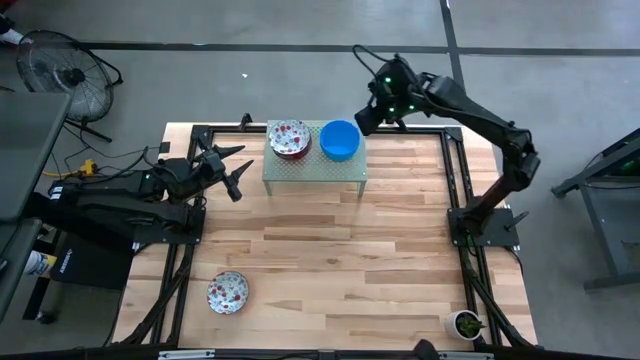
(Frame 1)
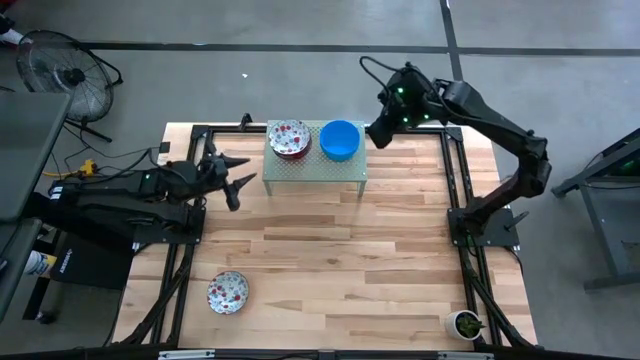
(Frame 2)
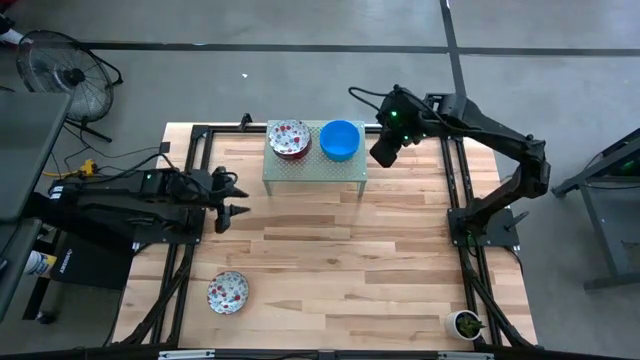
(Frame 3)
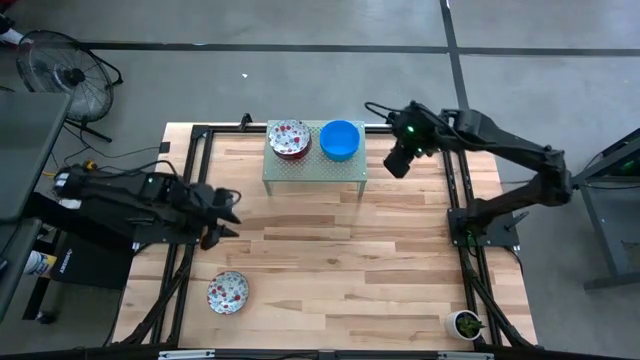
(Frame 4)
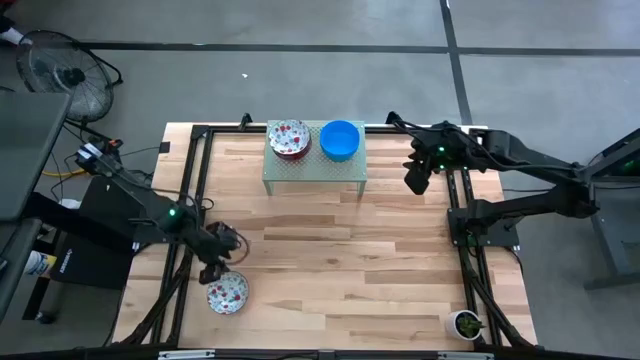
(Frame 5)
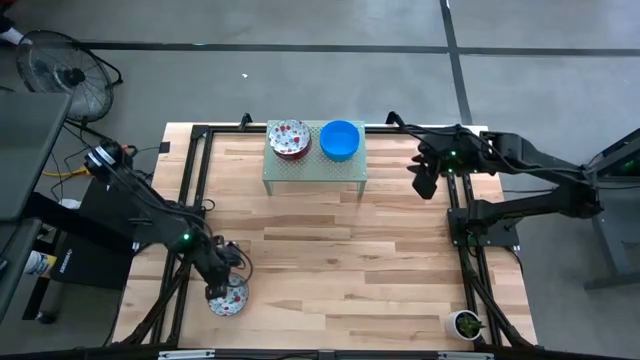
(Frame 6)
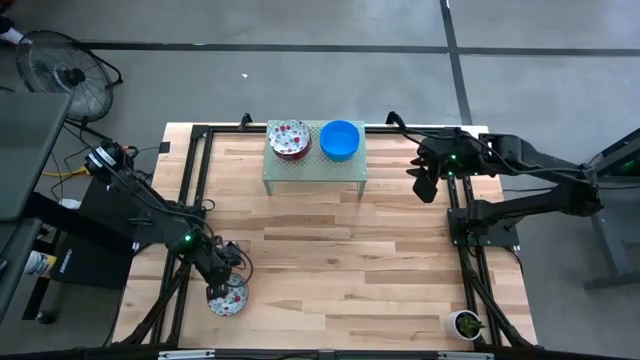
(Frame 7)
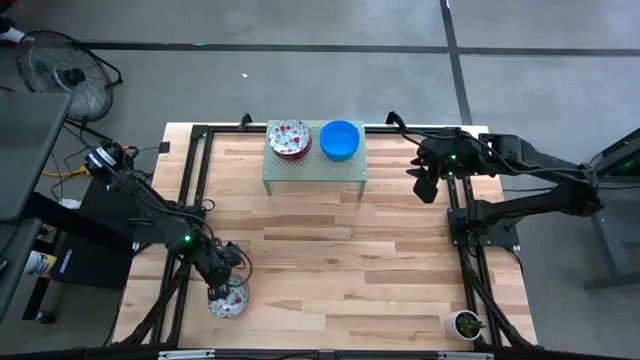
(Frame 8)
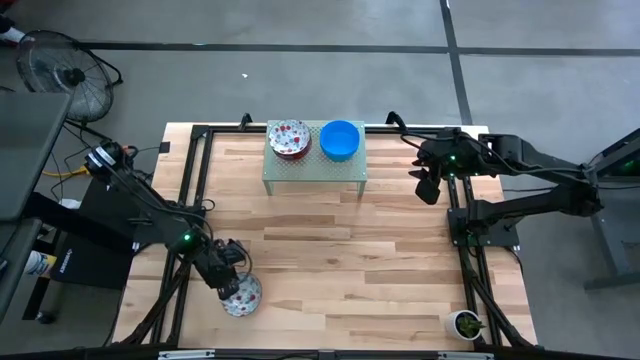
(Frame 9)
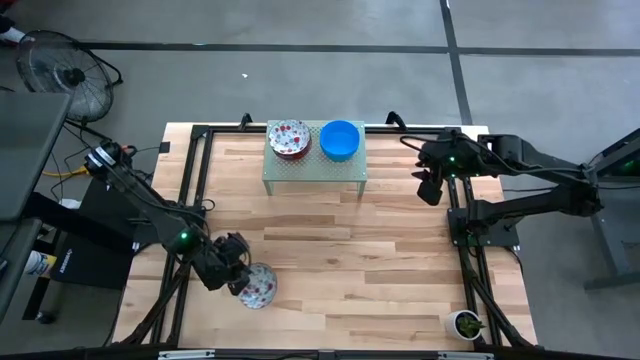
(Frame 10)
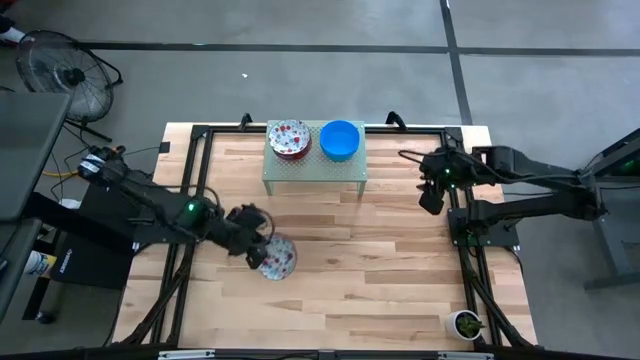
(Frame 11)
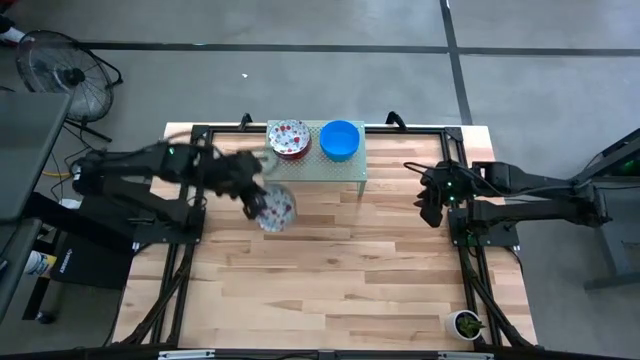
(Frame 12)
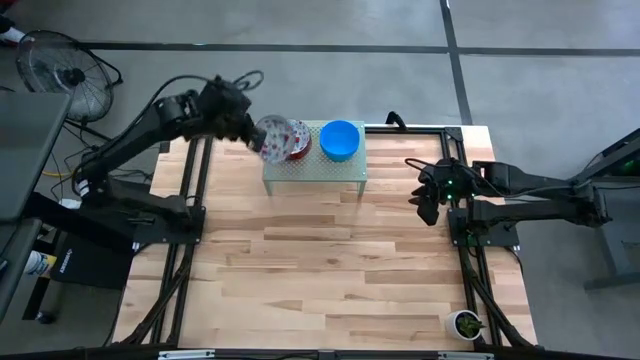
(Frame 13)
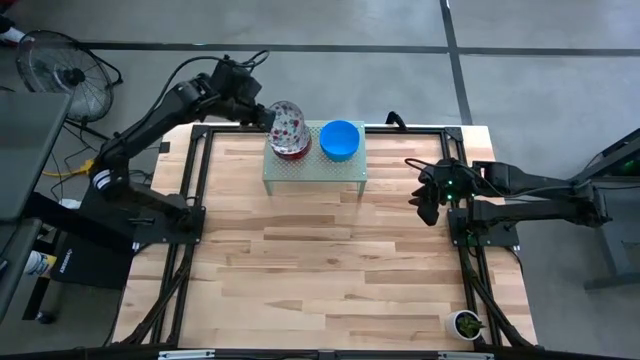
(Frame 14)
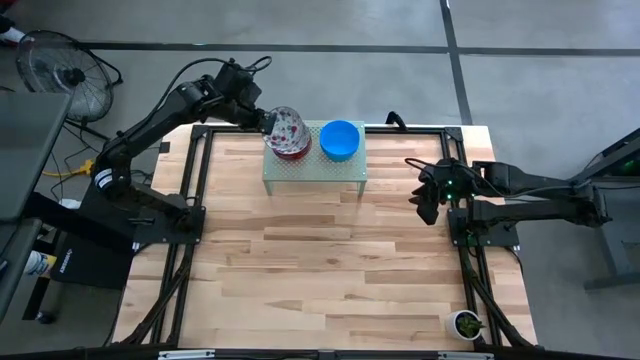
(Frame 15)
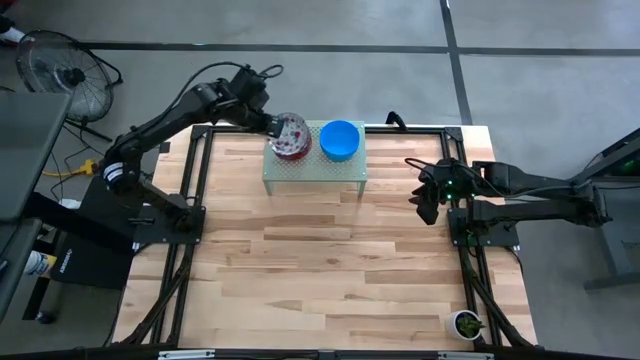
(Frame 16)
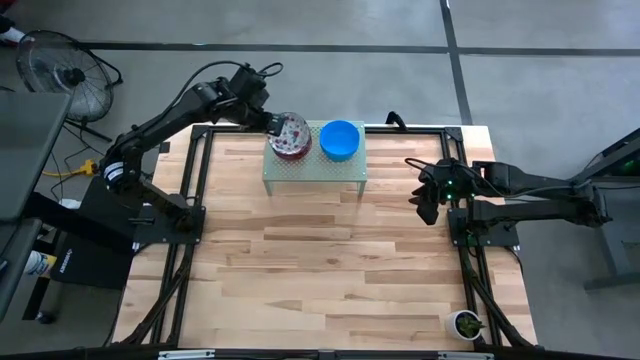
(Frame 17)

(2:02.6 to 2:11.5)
Task: Pick & Place Mini bowls
Stack the white and red bowl on top of the stacked white and red bowls on the shelf

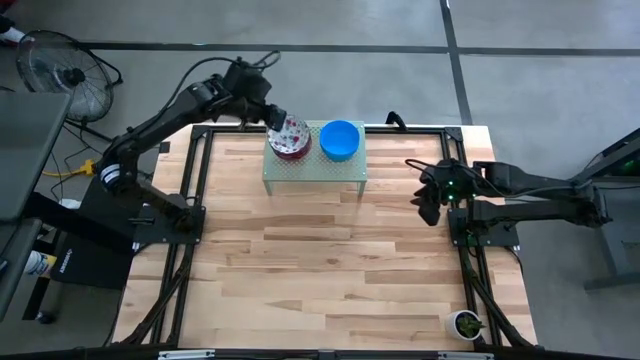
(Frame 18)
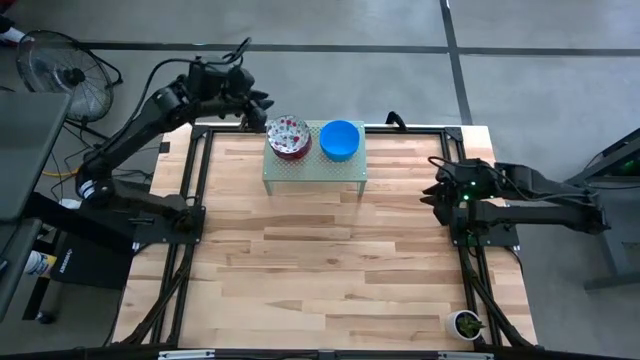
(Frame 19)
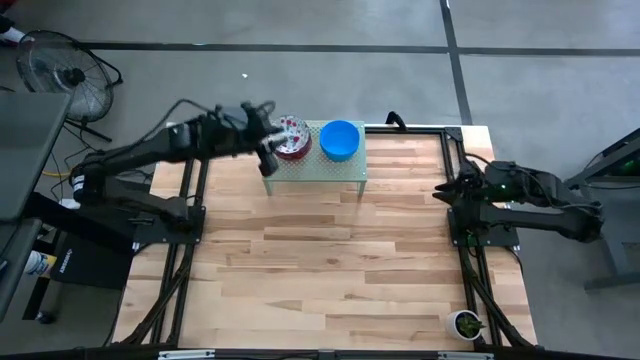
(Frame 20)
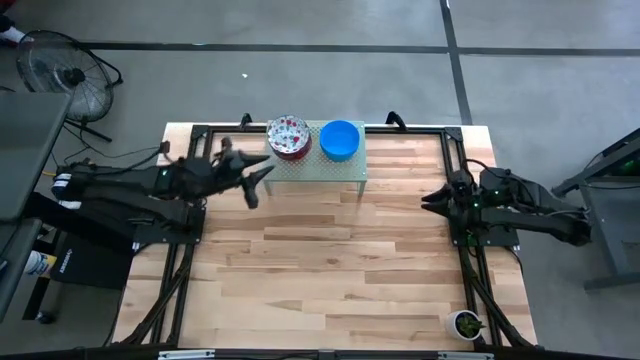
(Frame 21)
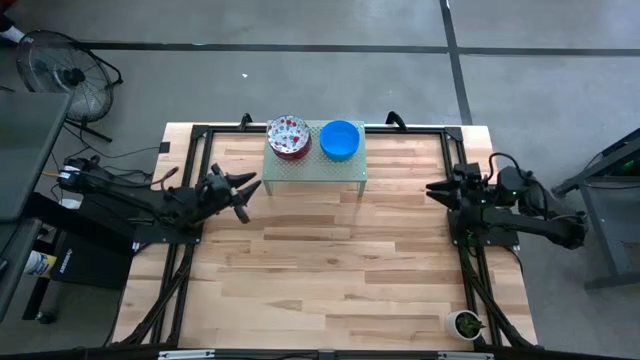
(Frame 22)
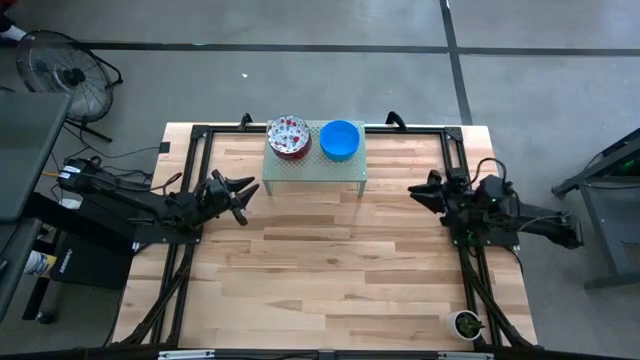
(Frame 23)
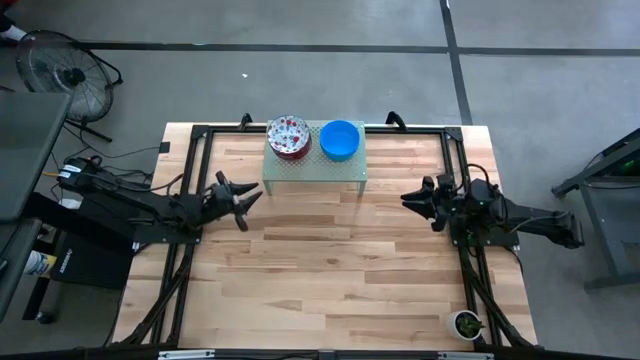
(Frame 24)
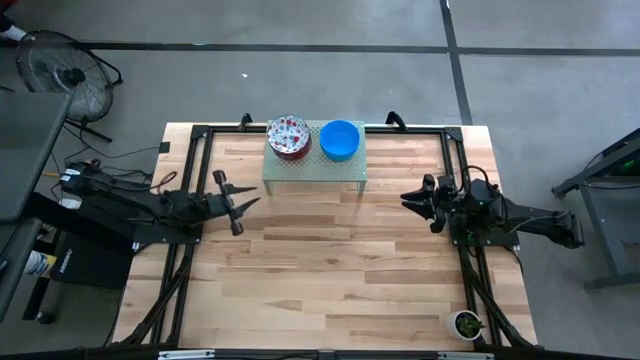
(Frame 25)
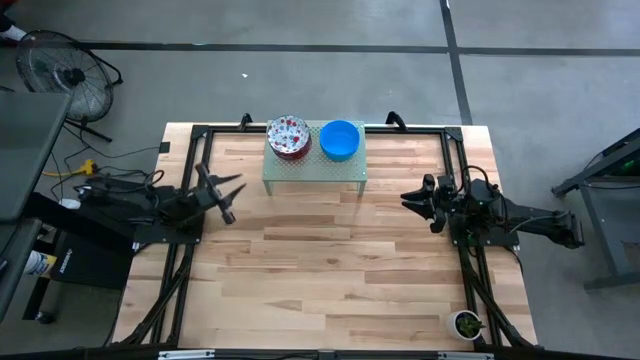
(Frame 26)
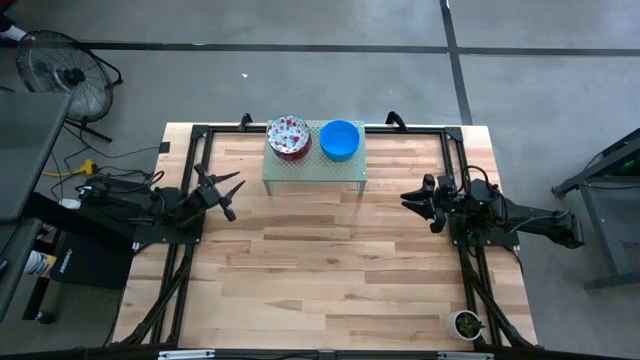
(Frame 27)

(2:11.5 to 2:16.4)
Return to Home Position

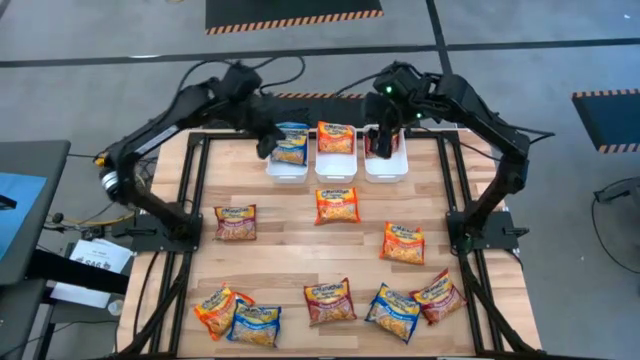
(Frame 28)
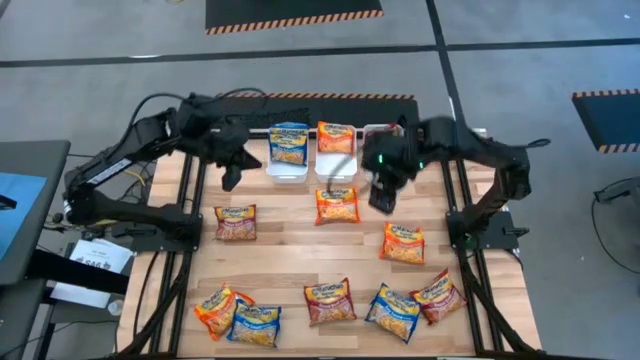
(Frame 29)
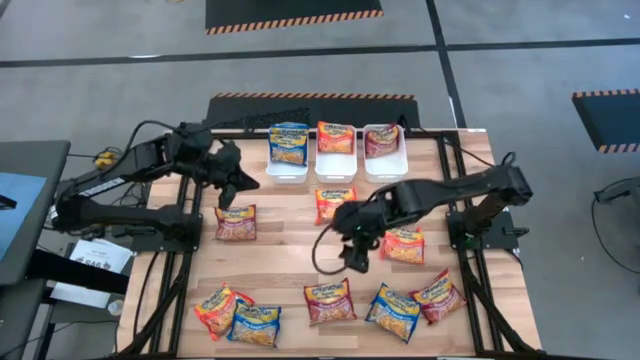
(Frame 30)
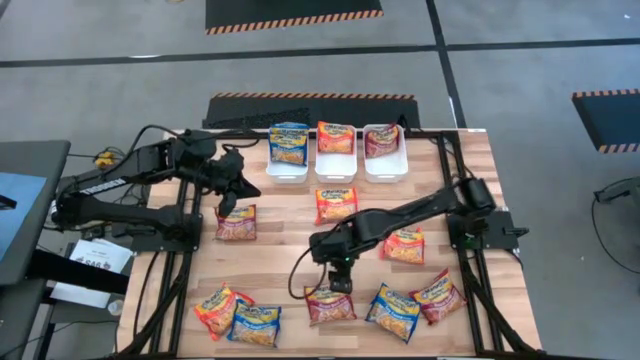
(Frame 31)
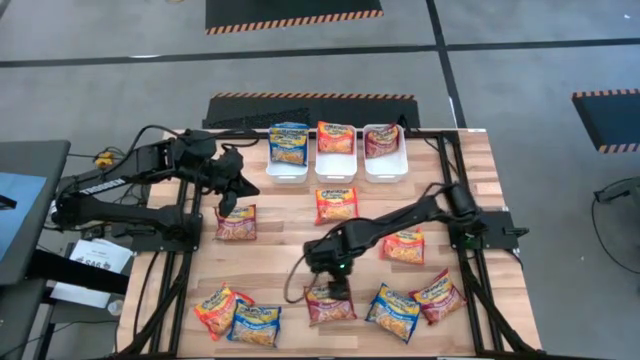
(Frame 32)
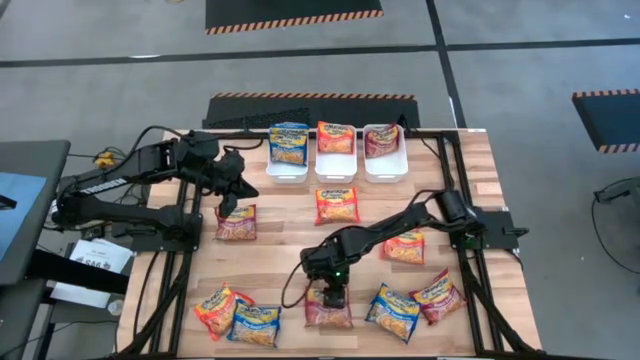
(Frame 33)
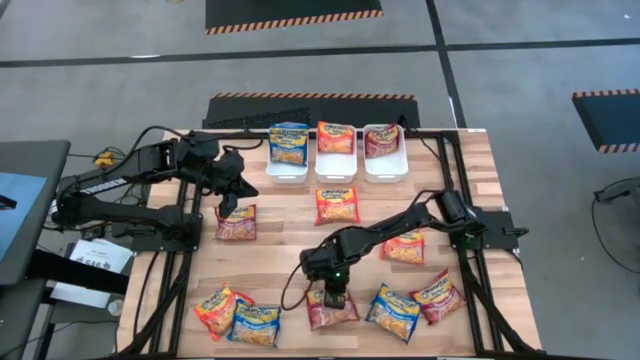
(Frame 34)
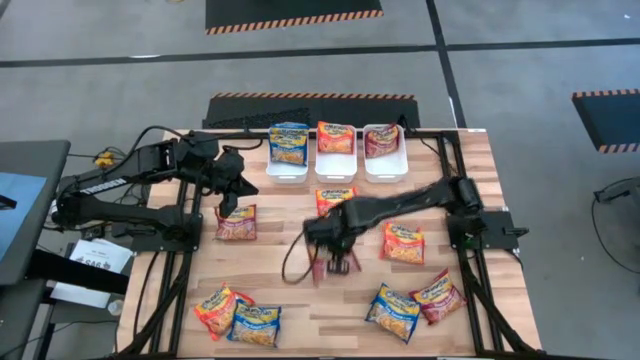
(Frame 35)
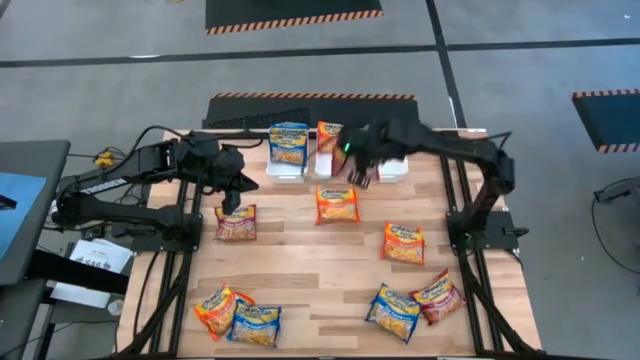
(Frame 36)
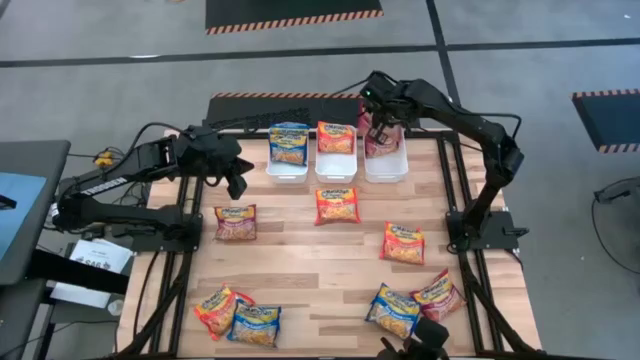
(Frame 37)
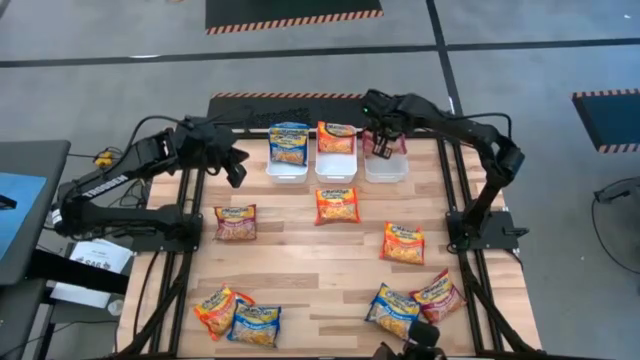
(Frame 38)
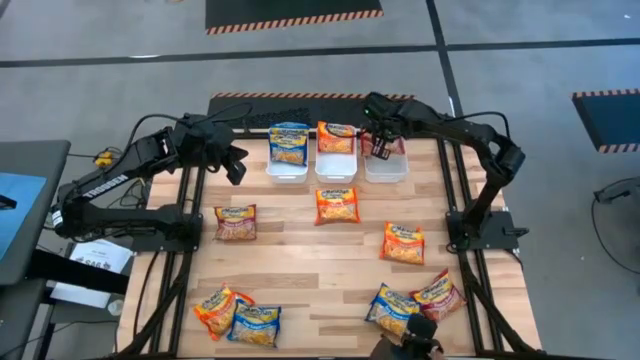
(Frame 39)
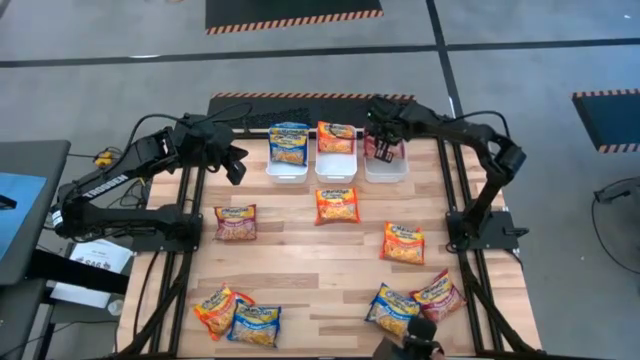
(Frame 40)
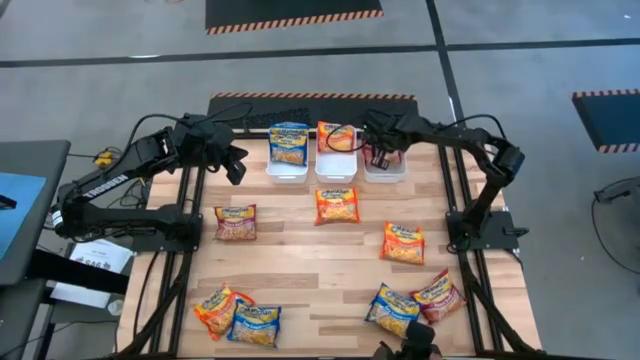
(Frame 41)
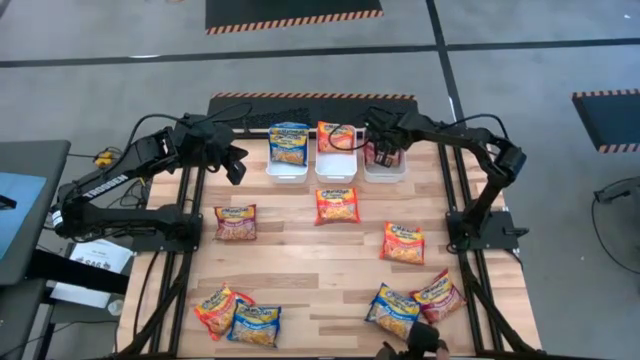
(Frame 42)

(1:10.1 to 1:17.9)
Task: Sort Maruchan noodles
Put the red noodle pack into the right white bin

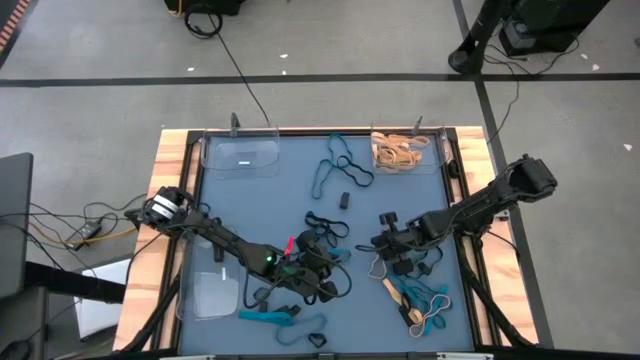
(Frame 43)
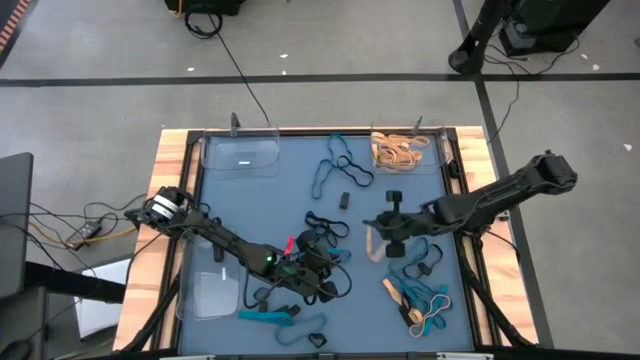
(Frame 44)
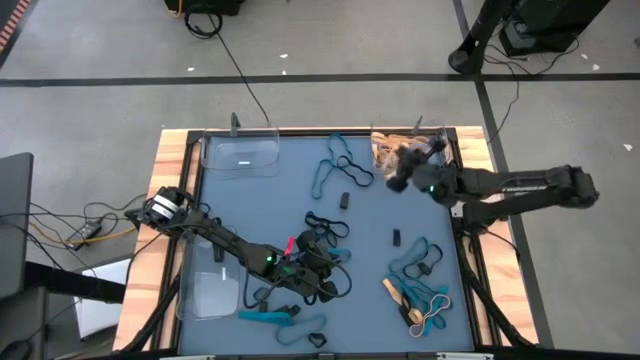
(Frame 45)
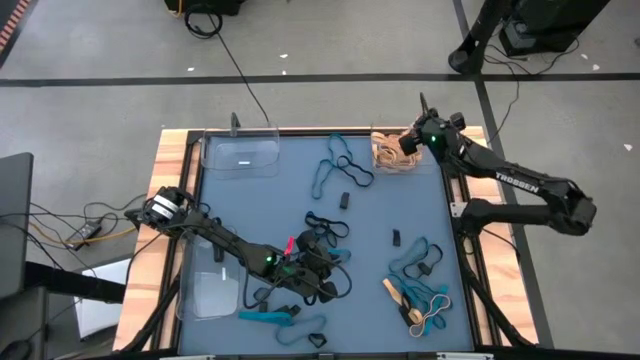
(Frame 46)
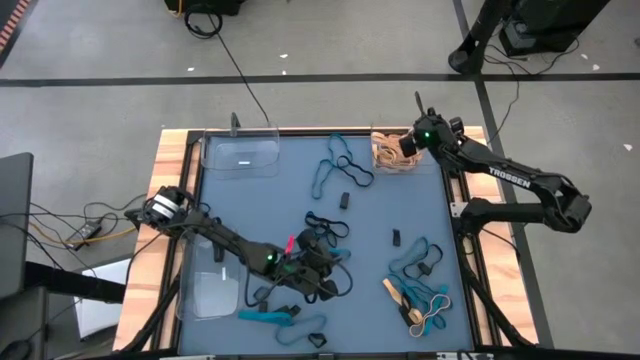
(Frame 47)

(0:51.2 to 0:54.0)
Task: Sort rubber bands into baskets
Put the yellow rubber band into the top right transparent bin
